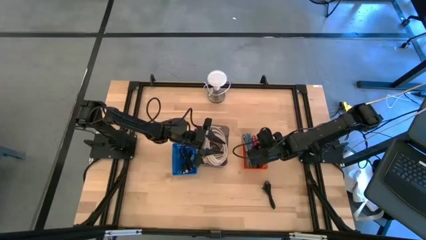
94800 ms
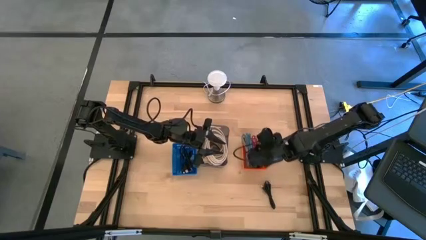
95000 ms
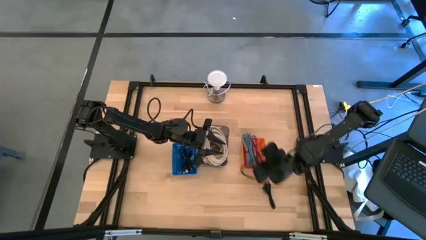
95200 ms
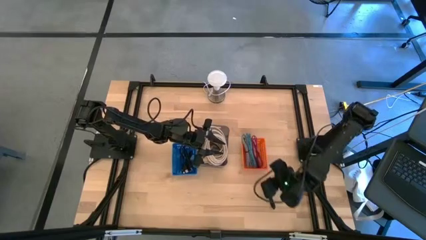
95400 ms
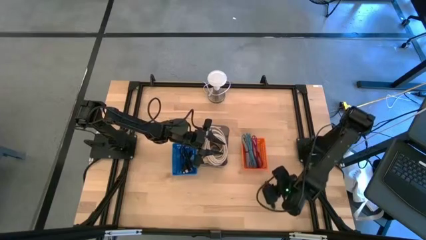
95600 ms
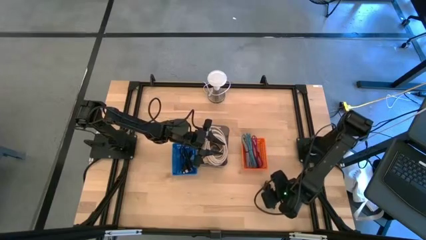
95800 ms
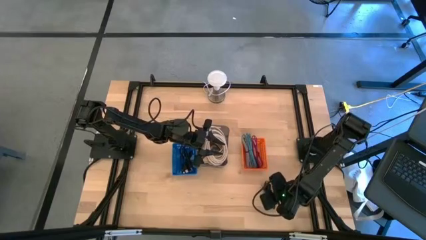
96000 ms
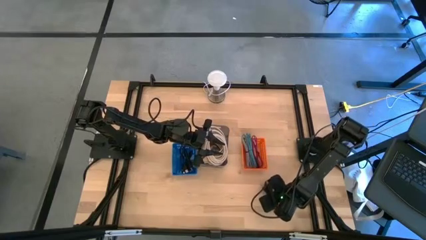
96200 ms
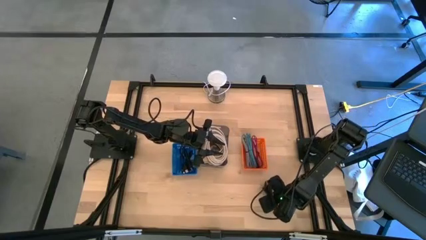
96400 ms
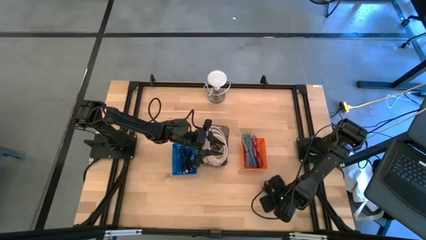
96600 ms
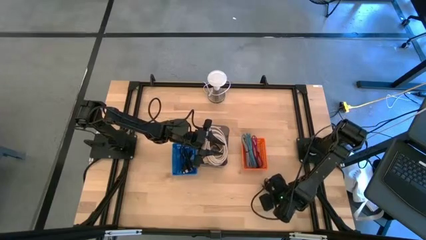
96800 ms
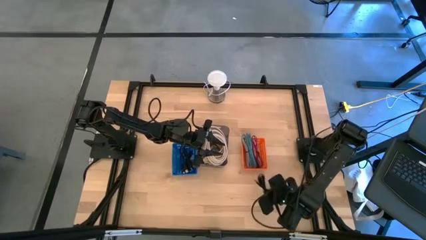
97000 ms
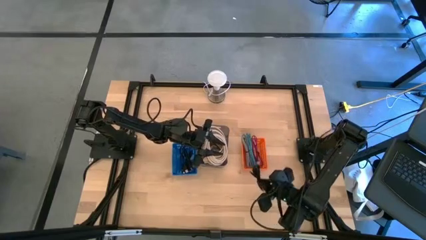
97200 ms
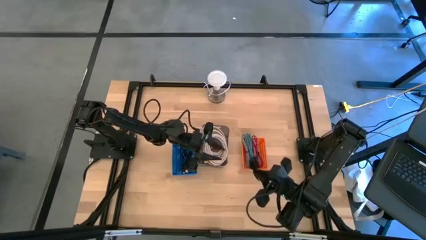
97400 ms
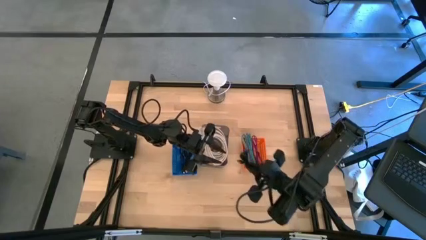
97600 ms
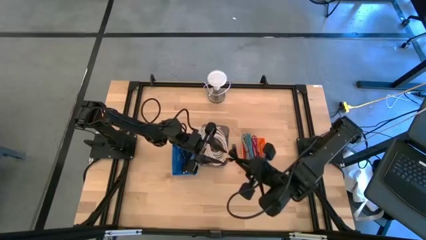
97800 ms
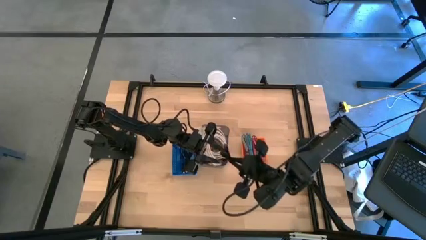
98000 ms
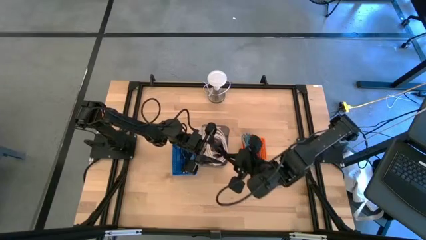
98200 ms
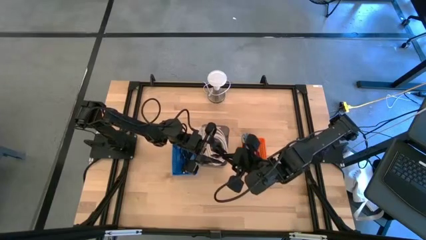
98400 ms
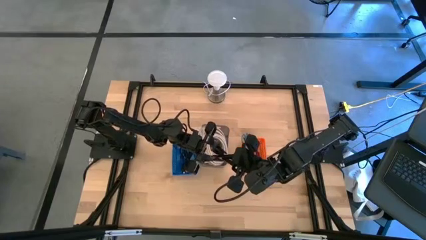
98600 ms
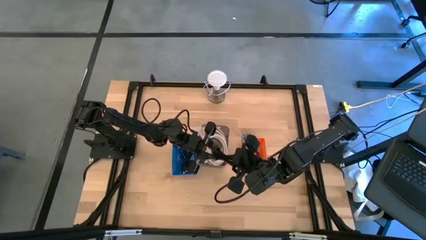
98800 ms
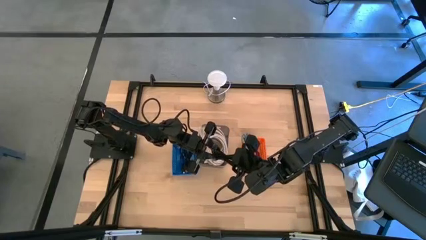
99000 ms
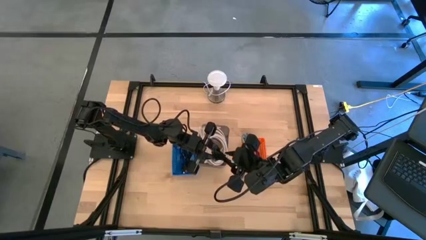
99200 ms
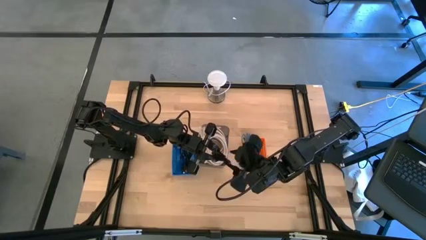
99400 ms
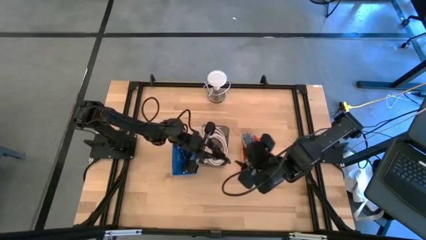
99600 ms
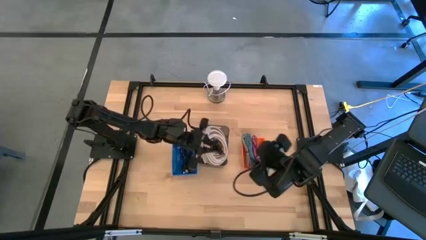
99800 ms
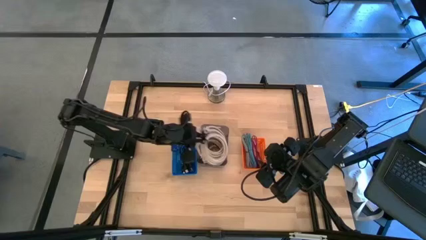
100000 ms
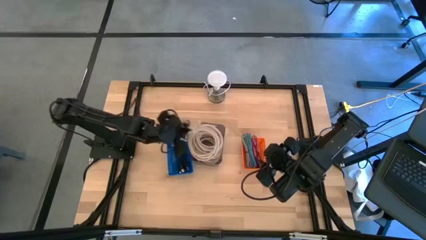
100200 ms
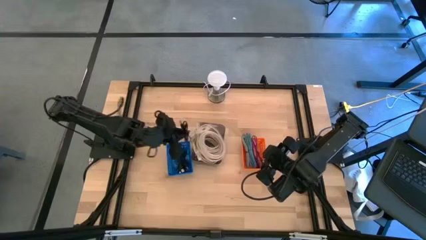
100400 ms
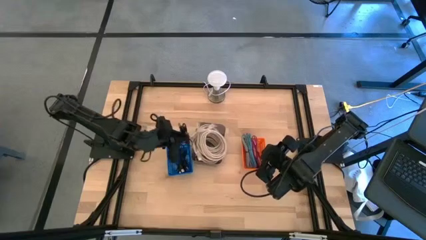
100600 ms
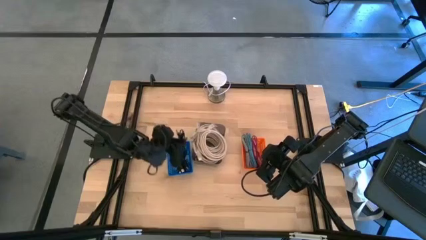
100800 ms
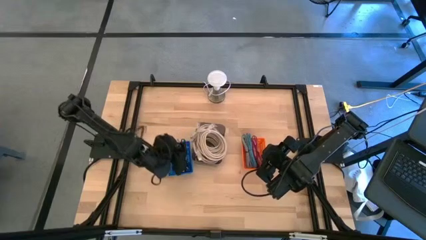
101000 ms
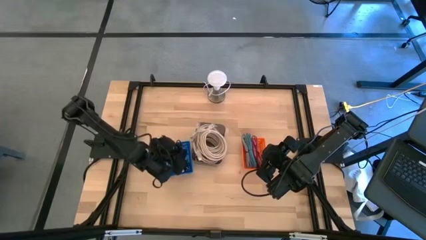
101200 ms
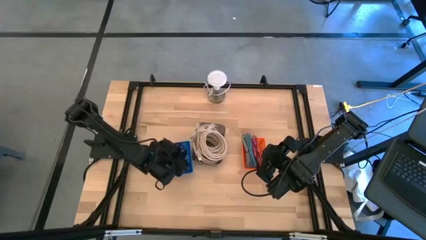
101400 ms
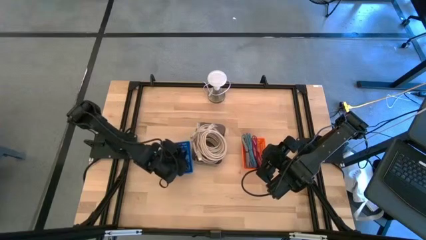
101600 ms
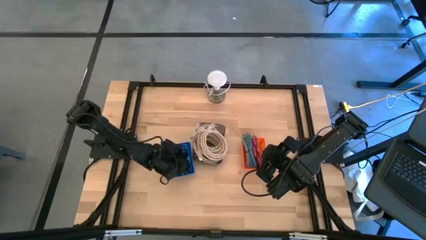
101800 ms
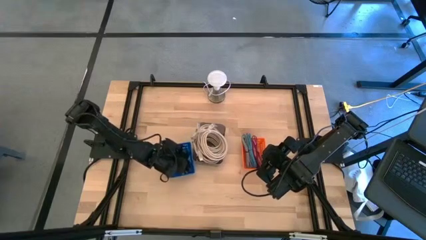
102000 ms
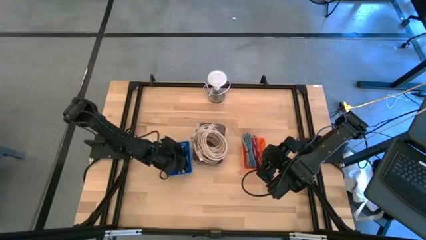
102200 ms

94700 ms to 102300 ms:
Task: Pick & Place USB Port
Put the black charger cable into the blue bin

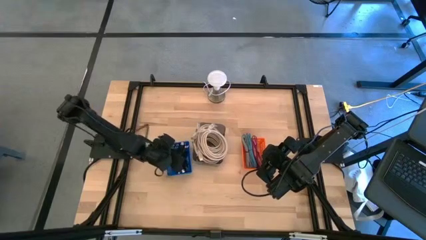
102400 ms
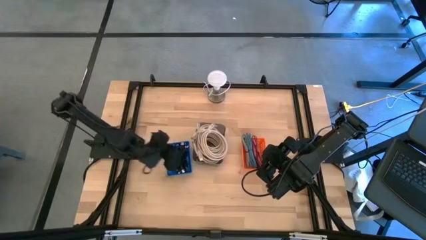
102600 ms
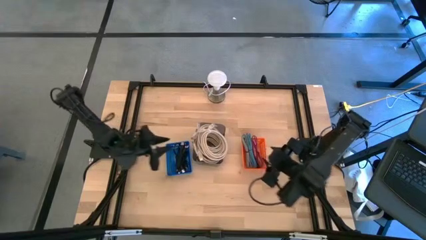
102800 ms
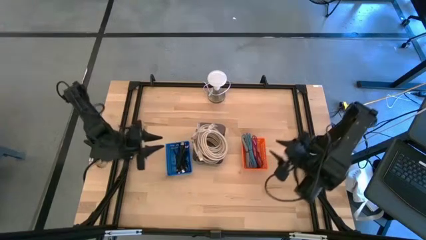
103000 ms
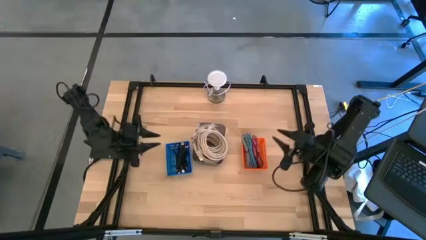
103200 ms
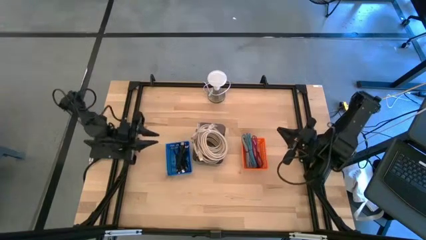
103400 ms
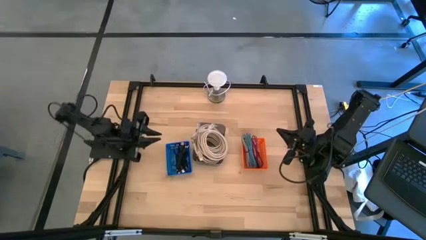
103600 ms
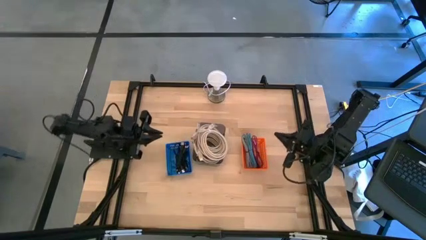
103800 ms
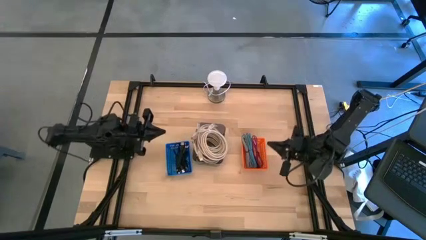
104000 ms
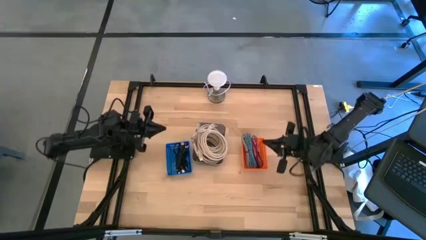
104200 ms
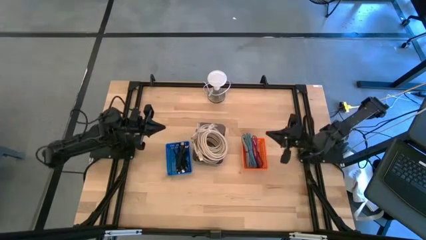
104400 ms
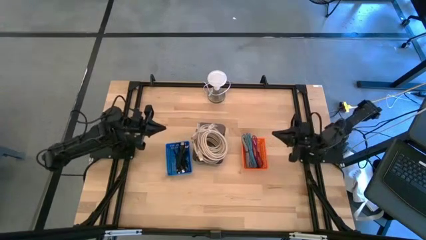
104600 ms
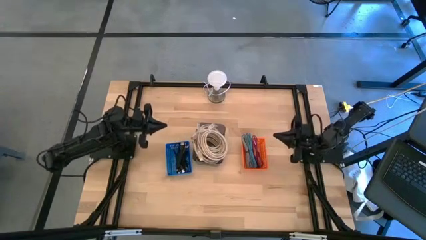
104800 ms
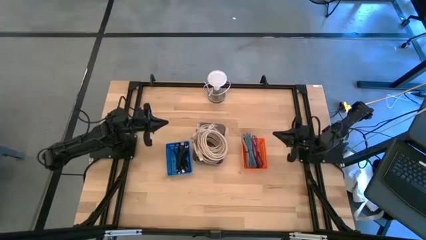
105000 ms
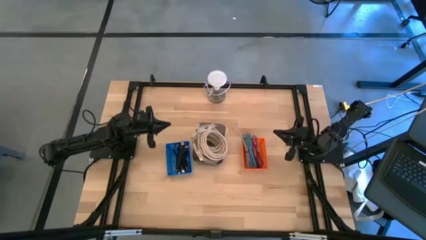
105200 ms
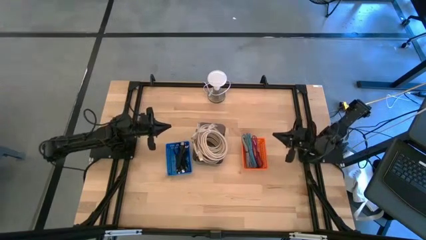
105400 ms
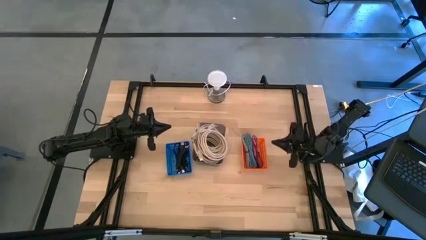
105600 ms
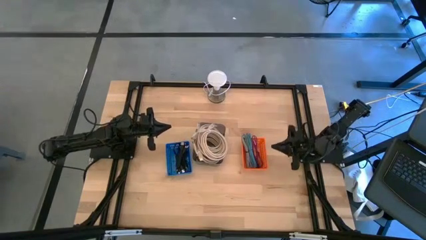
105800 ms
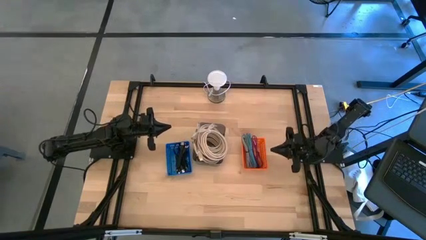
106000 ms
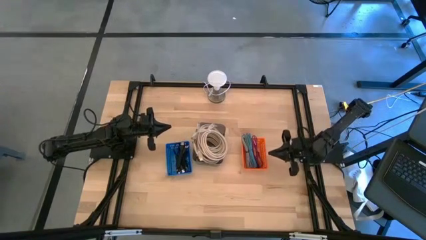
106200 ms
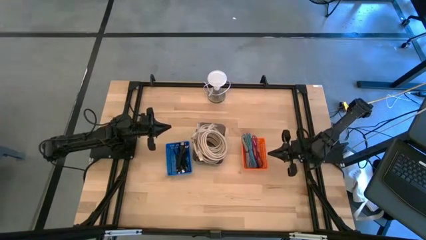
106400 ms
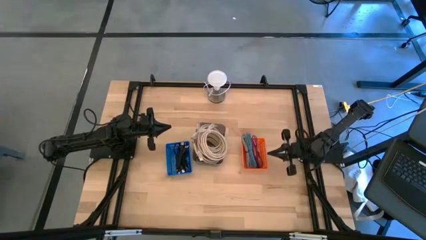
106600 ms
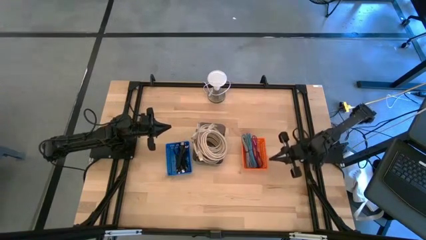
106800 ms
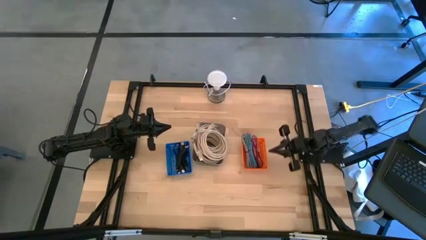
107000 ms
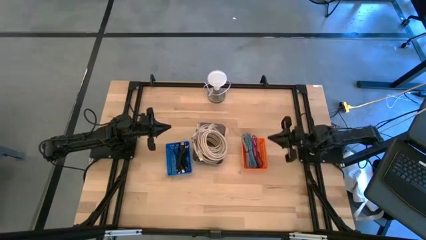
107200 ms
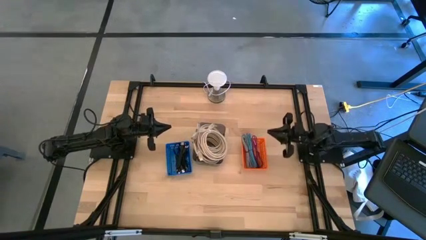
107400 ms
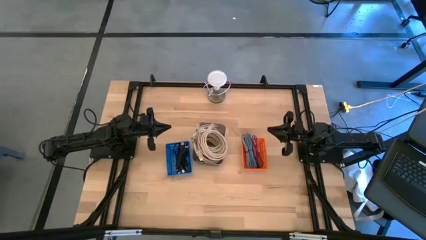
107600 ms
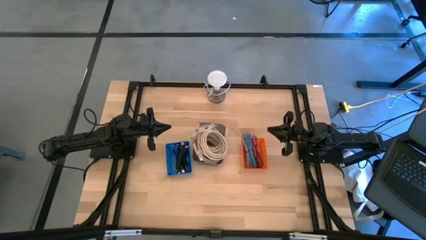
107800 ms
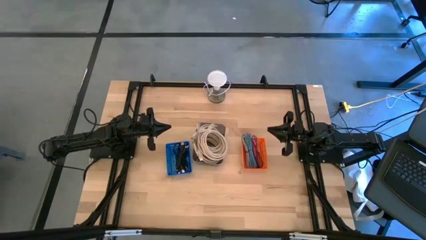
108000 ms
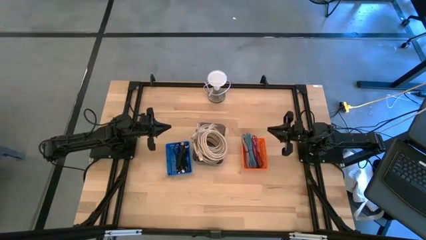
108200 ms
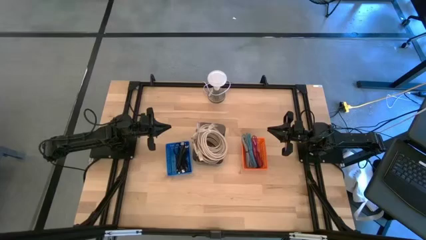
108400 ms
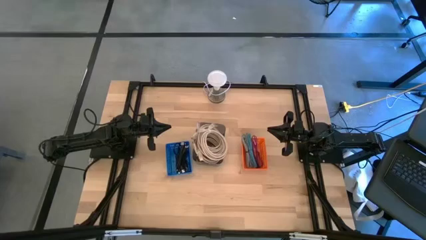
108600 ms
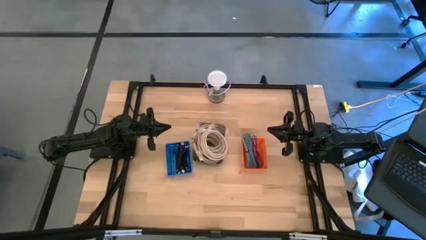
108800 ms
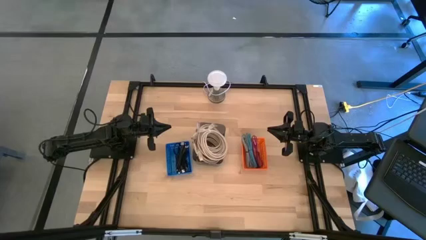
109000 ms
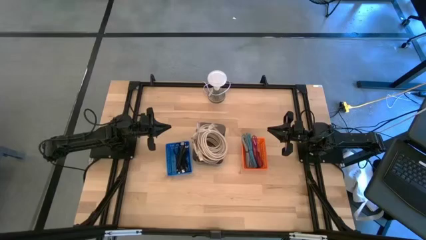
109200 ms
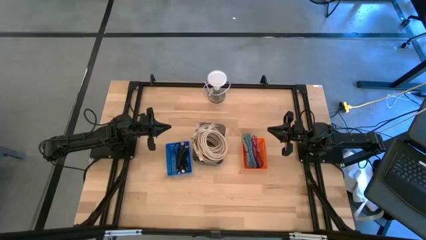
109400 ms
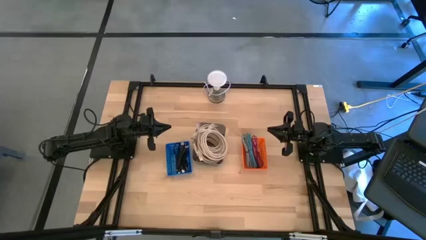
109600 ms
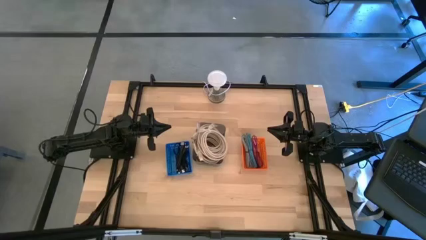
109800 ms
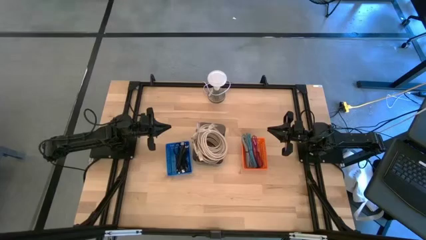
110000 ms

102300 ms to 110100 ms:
Return to Home Position

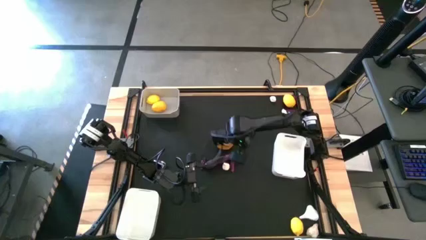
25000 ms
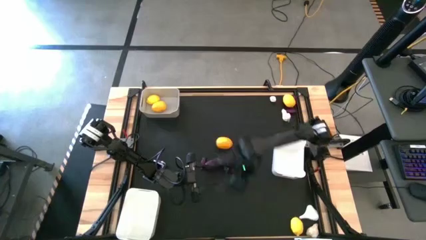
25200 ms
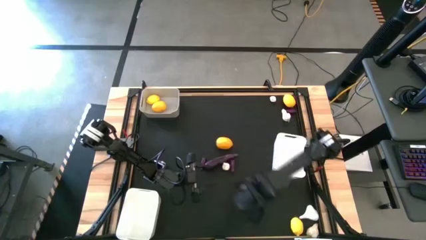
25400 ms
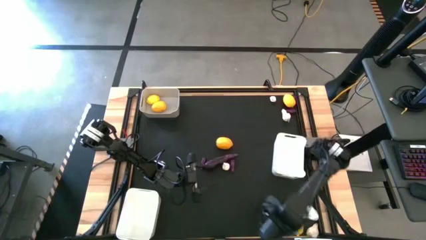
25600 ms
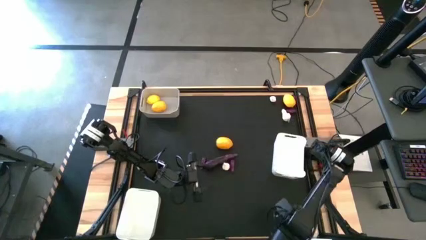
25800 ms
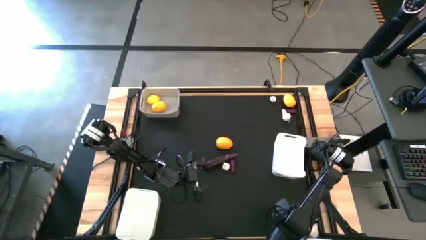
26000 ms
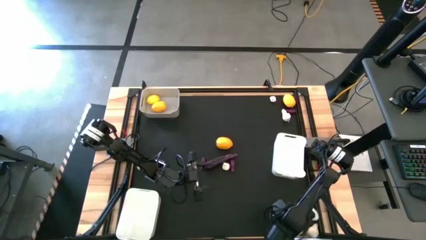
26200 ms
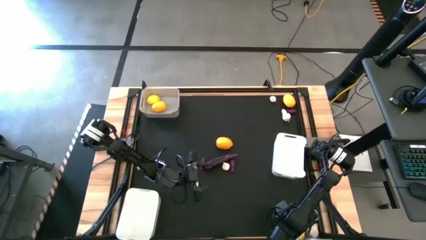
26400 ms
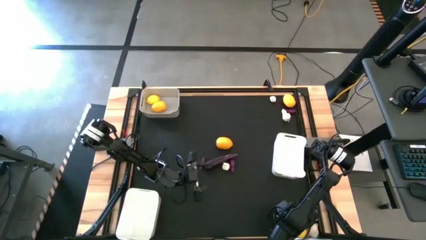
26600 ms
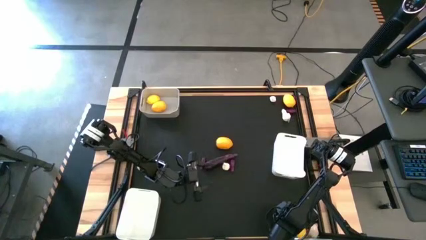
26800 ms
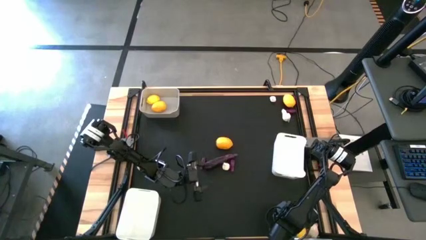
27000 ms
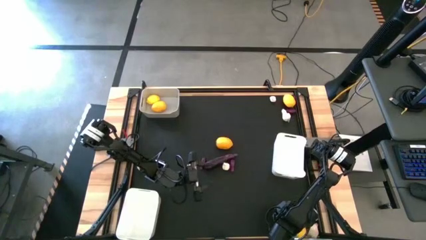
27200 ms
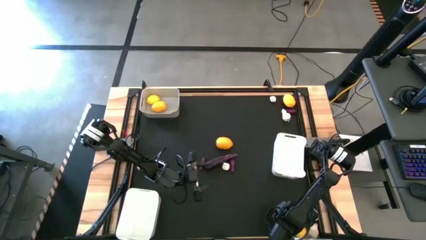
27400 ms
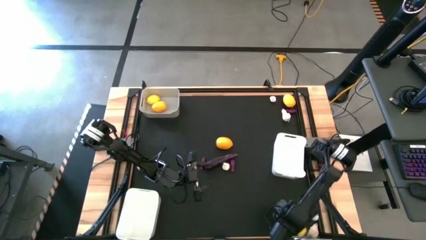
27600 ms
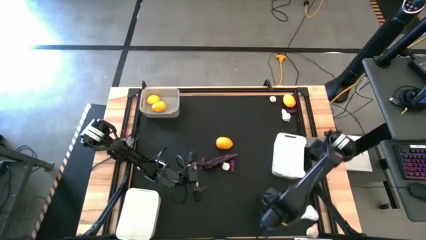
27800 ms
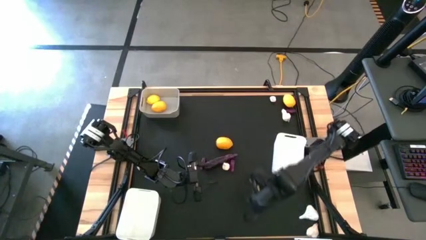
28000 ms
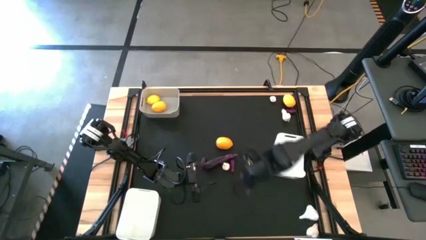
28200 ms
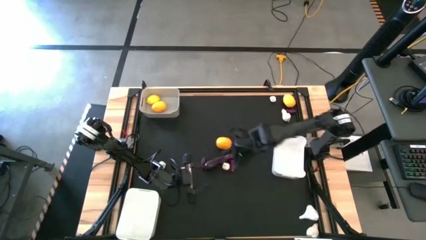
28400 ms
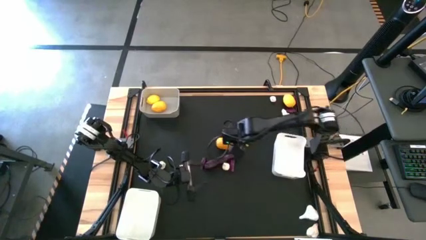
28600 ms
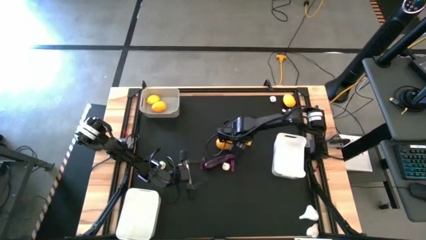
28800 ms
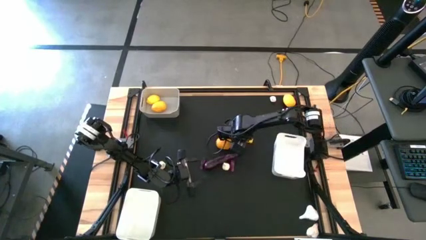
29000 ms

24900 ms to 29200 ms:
Task: Sort produce into baskets
Move the bottom right lemon to the center of the table
